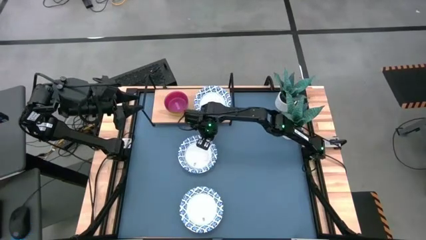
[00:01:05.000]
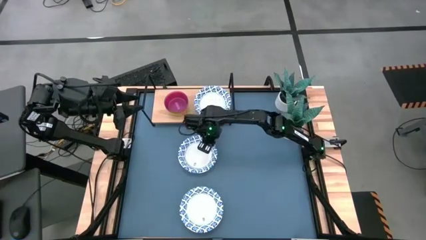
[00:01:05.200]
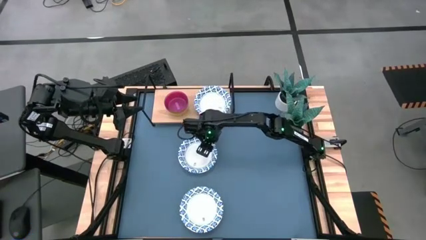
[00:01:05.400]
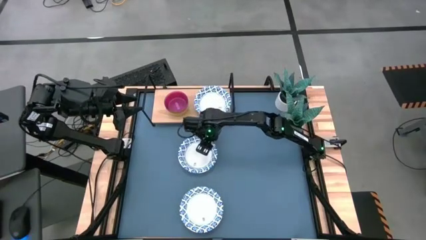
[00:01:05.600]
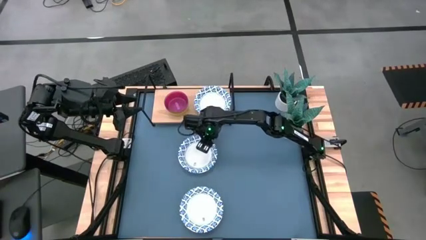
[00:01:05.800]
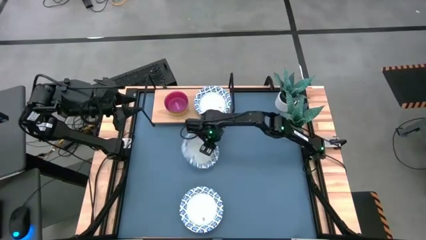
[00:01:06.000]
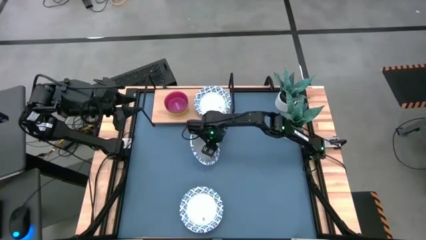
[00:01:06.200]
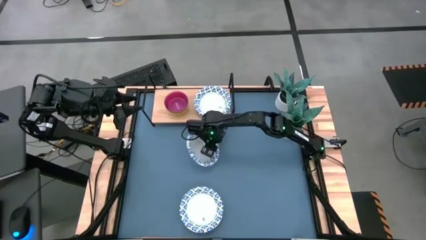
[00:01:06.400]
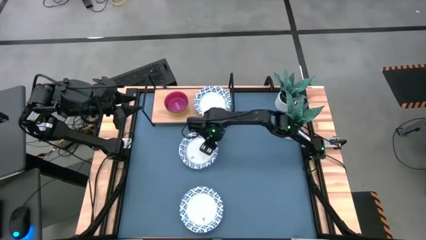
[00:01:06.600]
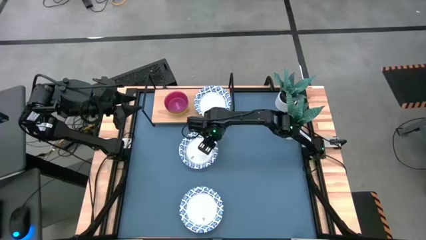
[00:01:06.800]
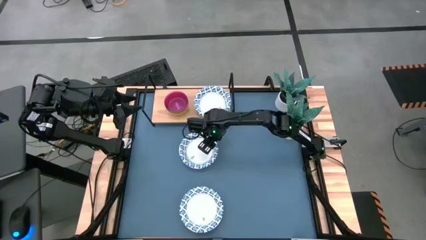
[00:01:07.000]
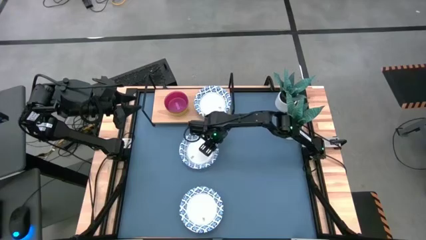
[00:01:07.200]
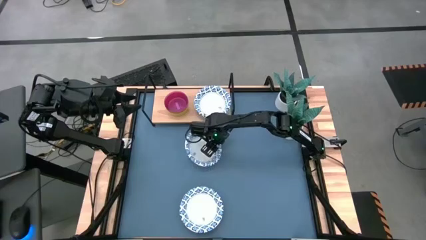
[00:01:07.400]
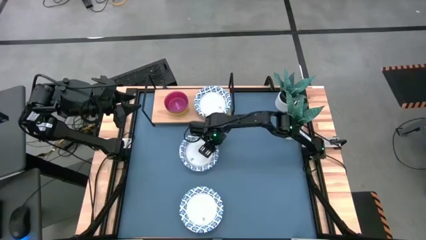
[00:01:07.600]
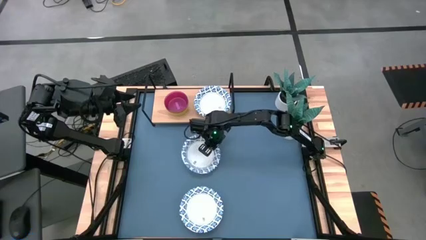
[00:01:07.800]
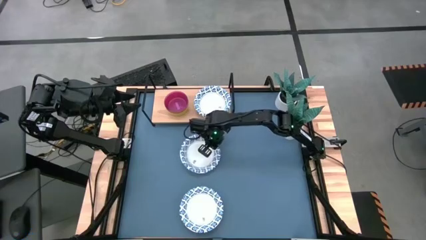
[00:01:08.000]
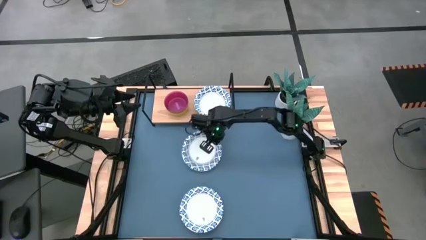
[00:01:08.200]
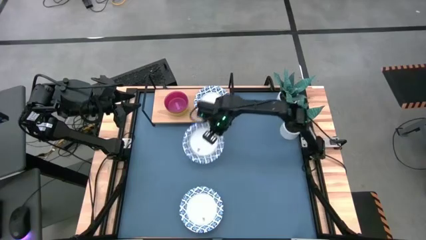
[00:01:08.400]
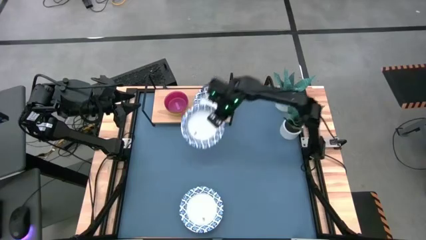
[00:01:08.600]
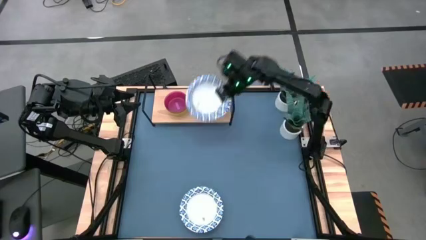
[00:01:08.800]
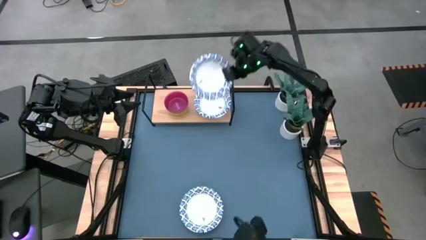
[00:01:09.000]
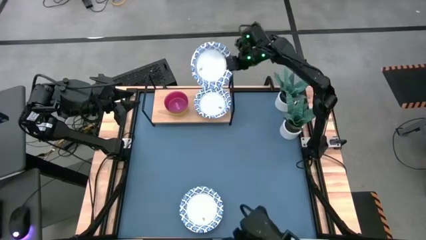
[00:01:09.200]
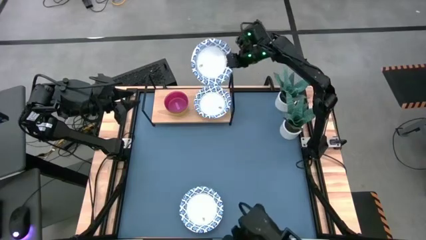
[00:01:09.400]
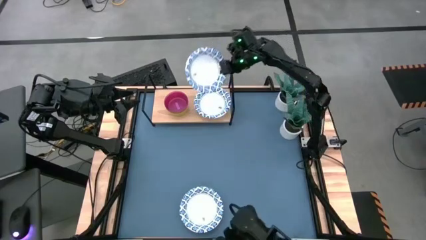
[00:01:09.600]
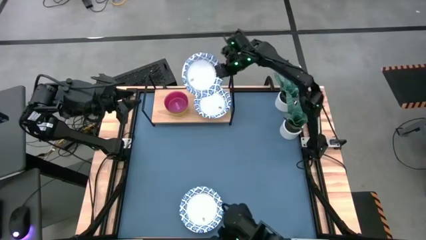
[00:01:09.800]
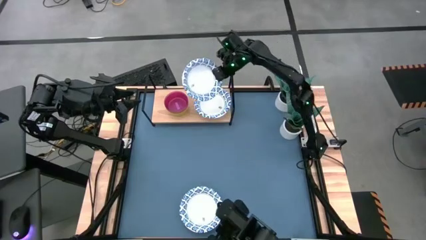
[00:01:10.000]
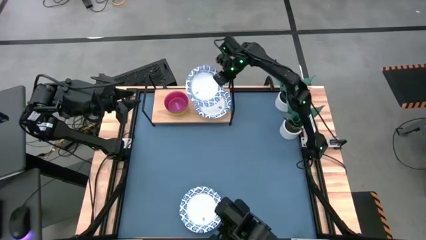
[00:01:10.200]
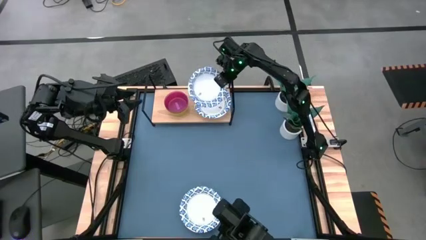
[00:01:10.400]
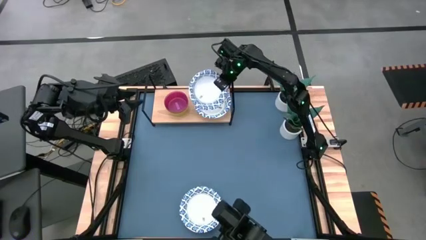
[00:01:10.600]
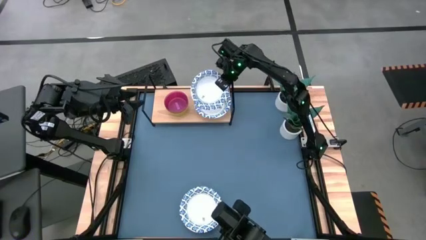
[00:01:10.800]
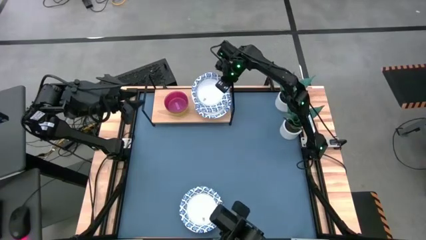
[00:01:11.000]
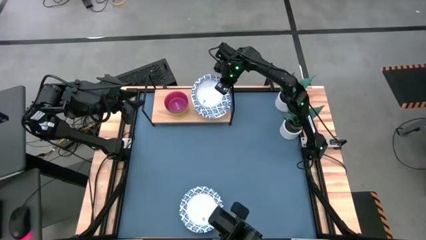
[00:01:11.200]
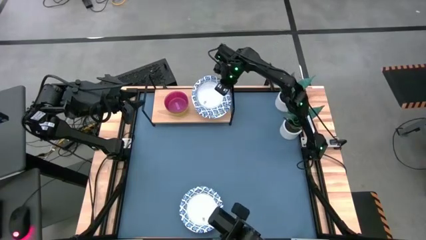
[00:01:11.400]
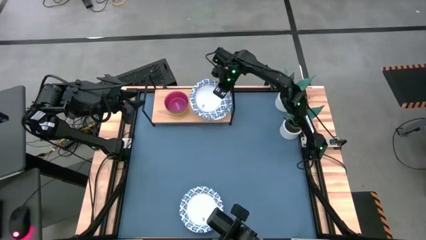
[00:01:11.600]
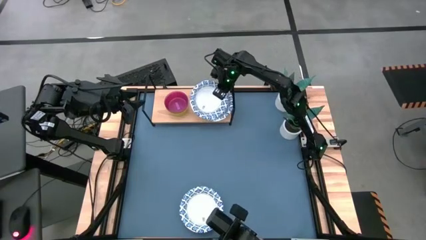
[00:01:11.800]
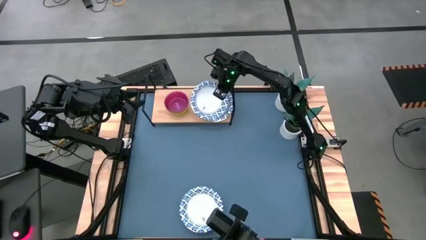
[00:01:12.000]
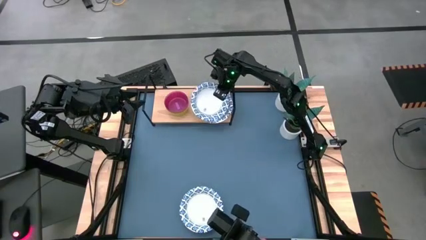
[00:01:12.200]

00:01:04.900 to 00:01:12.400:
Task: Place and stack bowls onto a shelf
Stack the white bowl on top of the other white bowl on the shelf

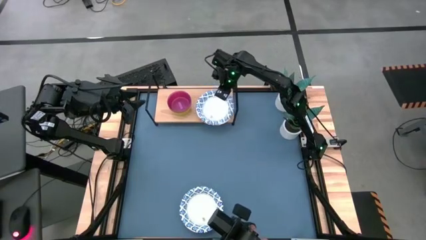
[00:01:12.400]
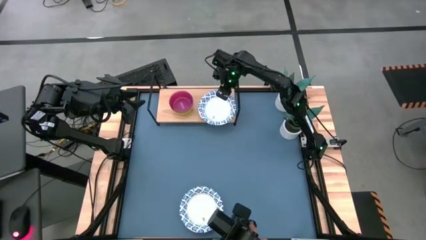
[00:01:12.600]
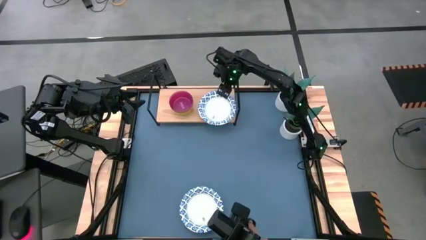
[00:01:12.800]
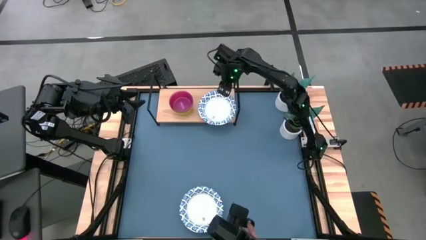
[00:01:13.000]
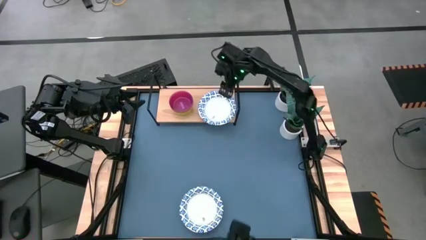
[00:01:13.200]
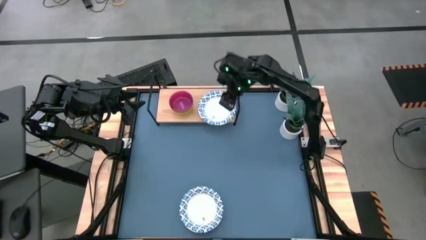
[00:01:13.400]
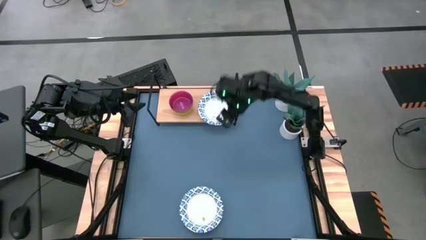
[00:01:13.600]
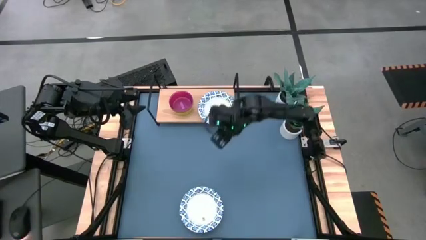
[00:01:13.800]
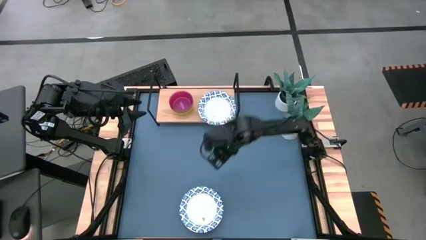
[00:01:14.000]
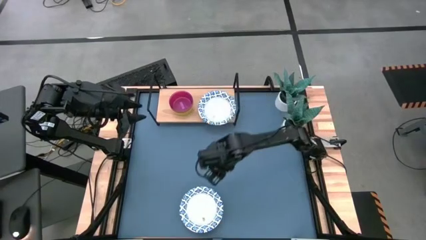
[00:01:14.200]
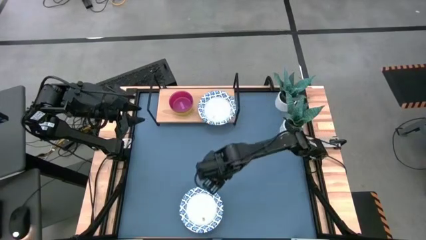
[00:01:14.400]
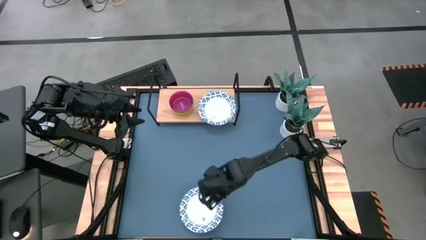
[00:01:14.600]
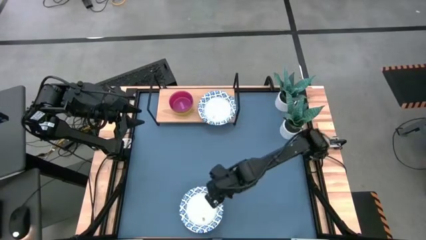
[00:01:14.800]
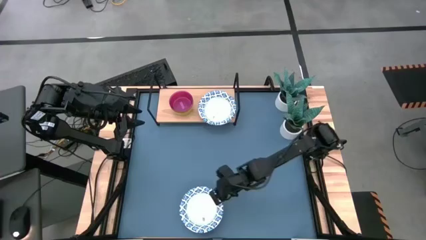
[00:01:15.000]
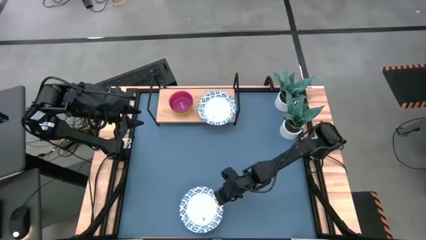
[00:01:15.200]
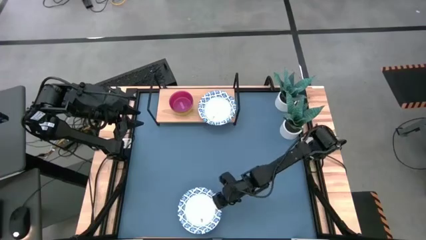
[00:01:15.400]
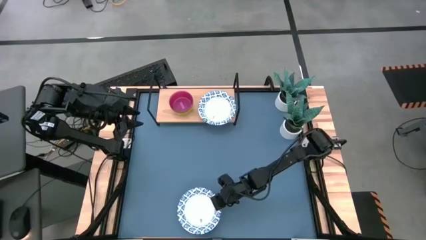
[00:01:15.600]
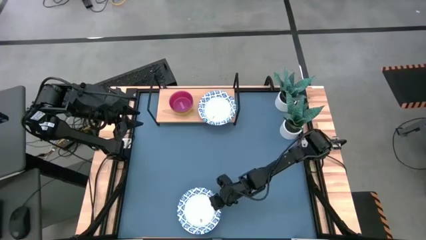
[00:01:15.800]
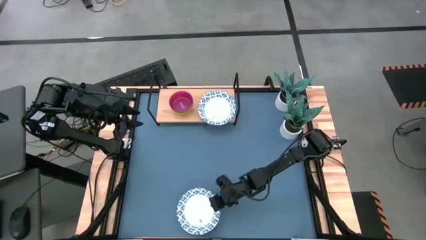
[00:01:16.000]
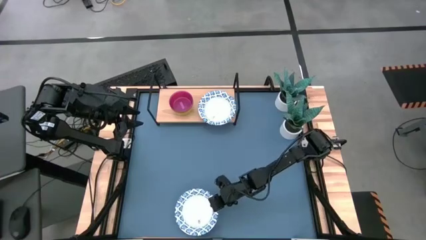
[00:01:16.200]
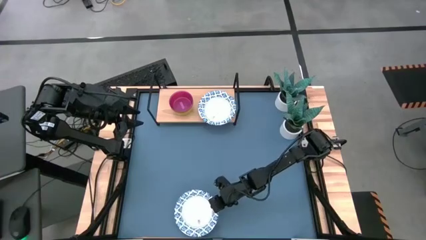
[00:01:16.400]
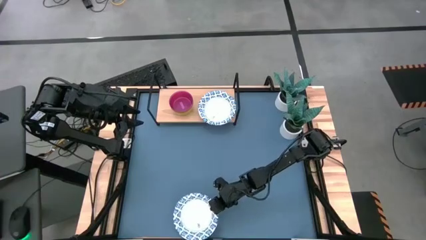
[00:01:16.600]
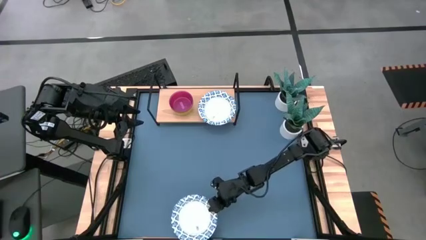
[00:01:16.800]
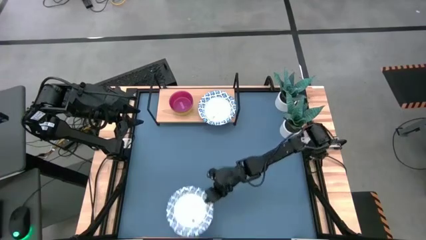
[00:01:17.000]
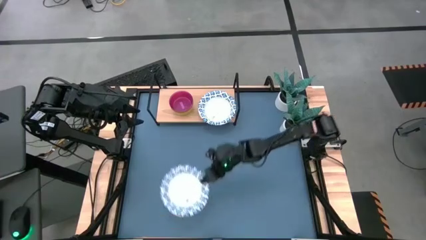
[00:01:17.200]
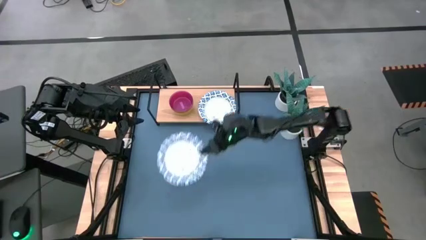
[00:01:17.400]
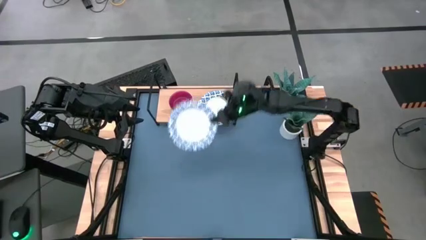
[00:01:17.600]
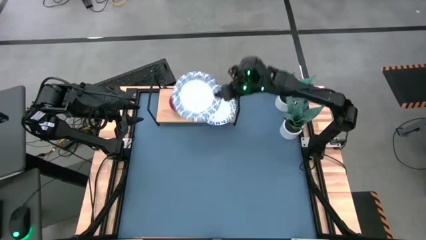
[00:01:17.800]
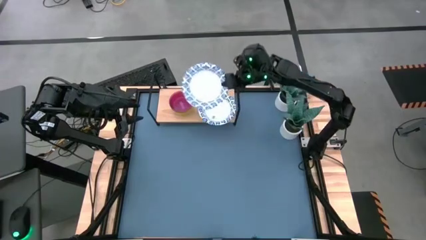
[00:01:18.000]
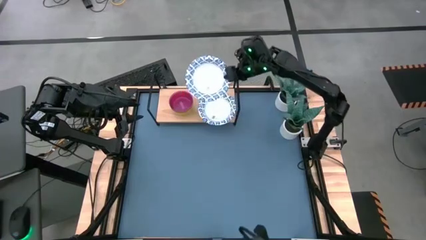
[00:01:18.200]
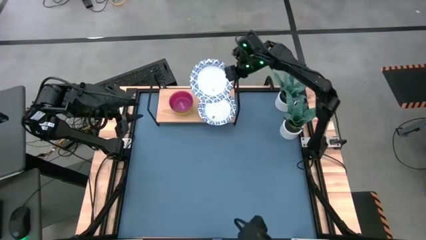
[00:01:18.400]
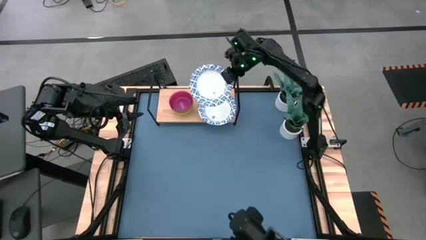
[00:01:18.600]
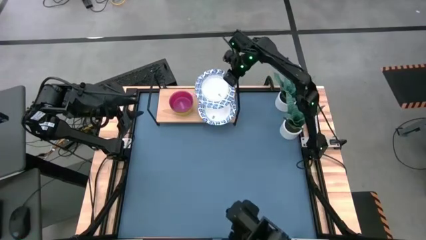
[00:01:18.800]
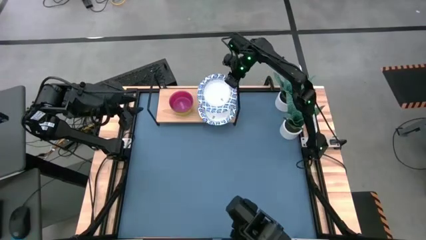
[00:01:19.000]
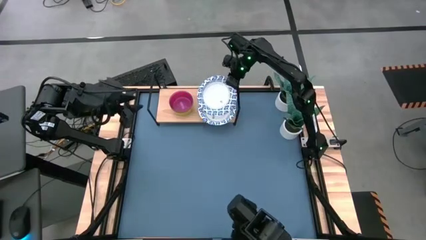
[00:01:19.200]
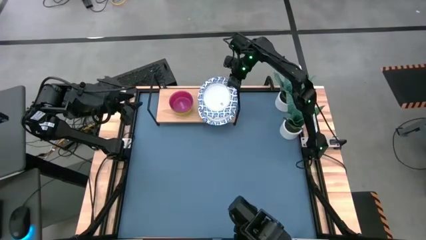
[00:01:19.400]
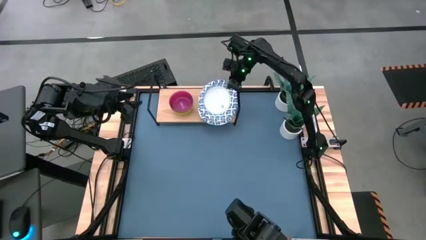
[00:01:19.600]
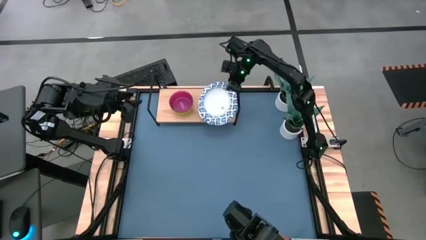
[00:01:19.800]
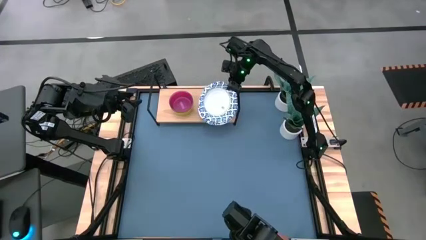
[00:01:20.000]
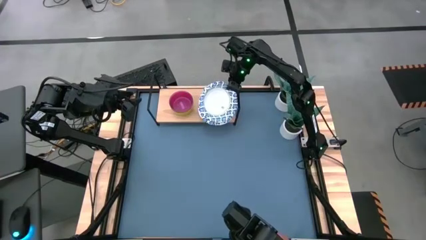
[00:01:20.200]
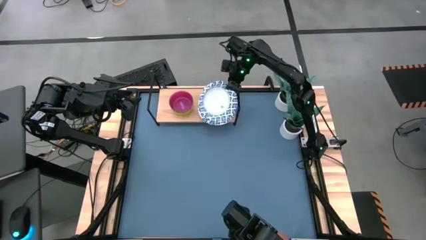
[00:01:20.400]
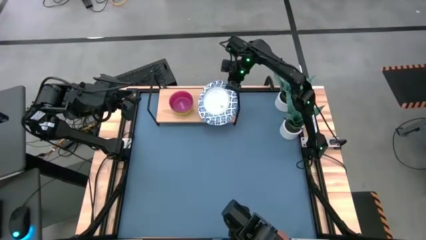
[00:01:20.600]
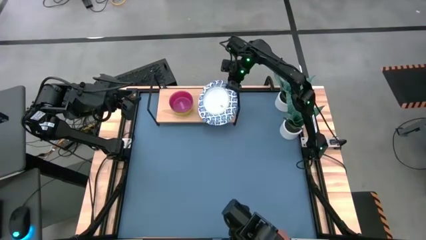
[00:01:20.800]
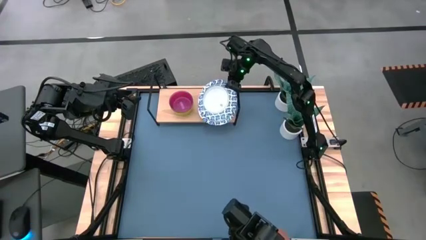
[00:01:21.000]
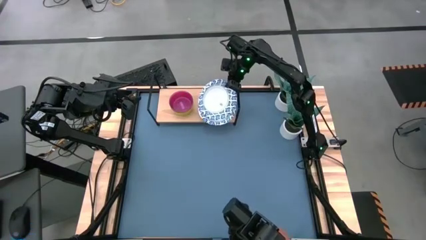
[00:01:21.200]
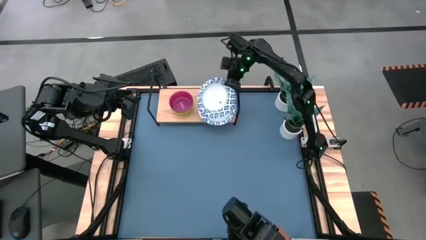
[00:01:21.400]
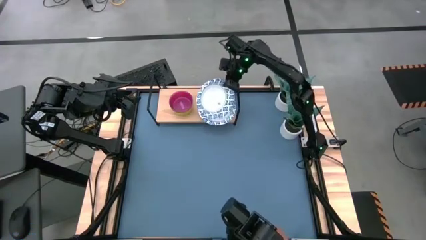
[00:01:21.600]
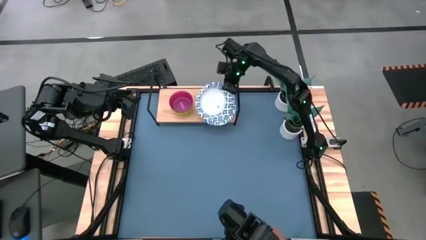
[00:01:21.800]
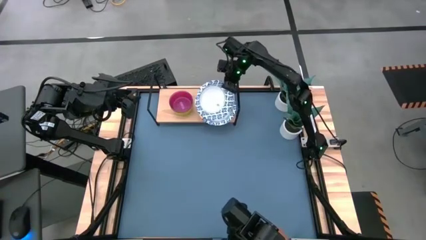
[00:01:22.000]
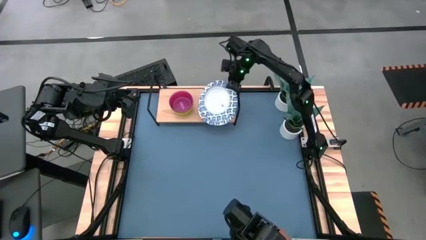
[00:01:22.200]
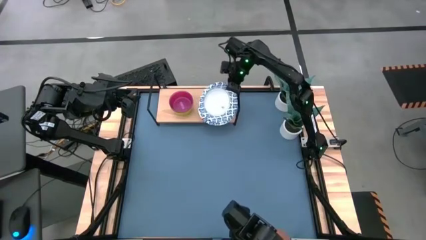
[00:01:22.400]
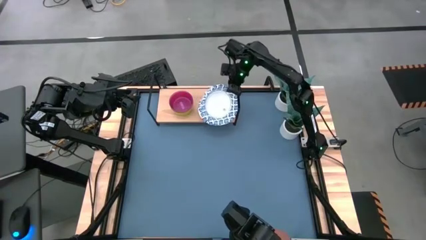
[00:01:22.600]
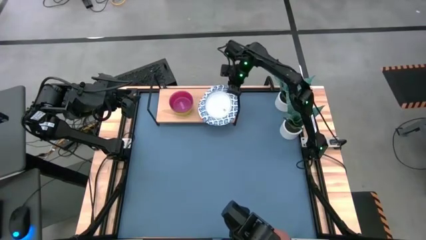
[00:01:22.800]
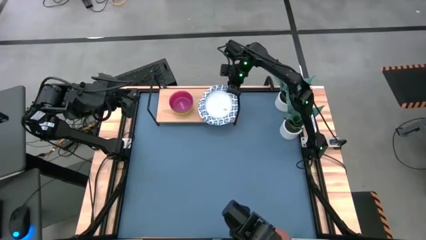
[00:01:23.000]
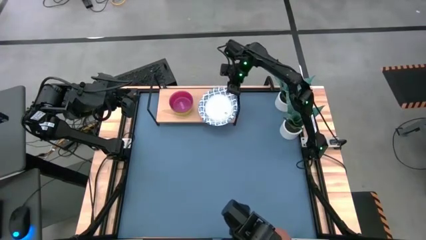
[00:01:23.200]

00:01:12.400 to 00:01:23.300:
Stack the white bowl on top of the other white bowl on the shelf
